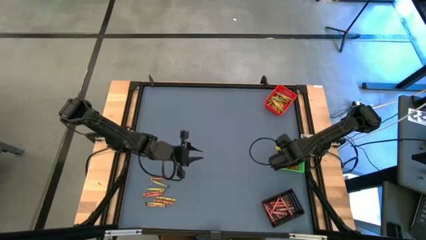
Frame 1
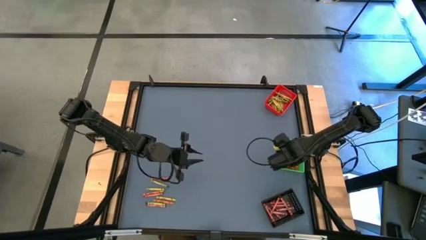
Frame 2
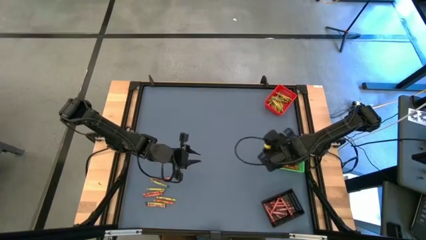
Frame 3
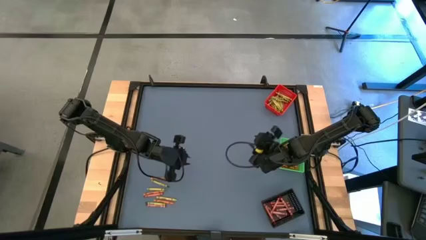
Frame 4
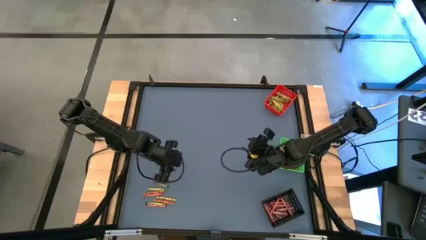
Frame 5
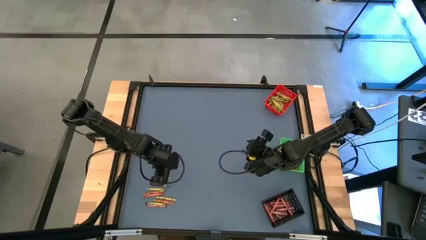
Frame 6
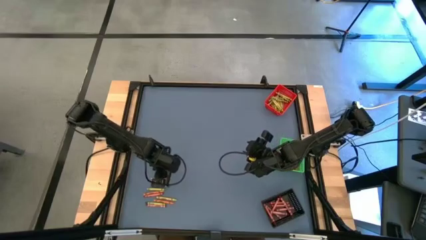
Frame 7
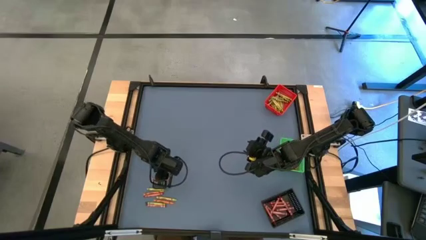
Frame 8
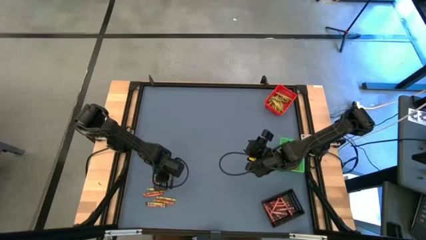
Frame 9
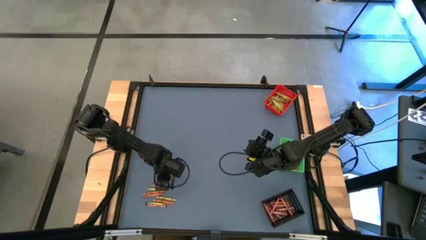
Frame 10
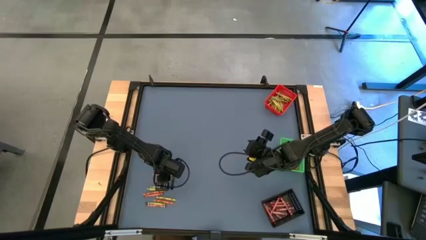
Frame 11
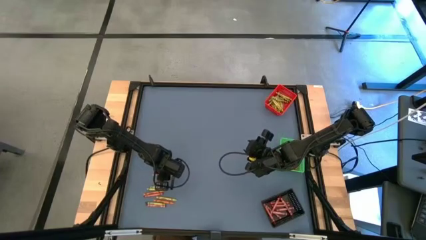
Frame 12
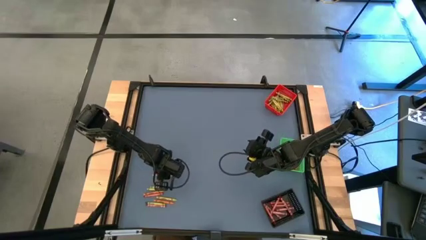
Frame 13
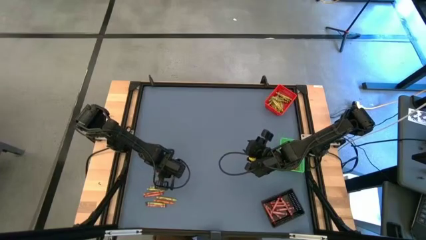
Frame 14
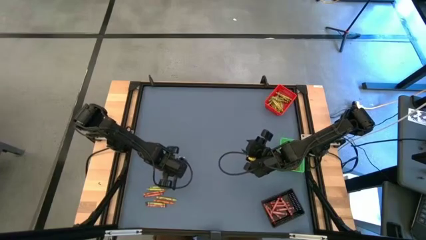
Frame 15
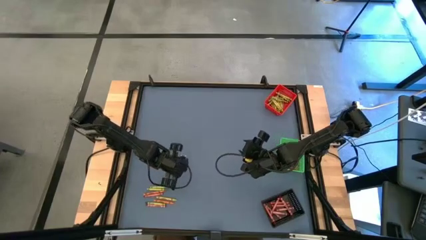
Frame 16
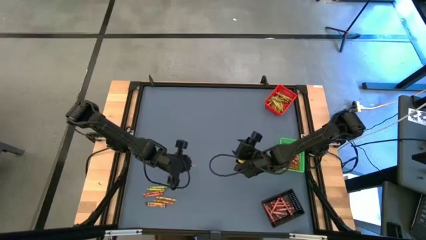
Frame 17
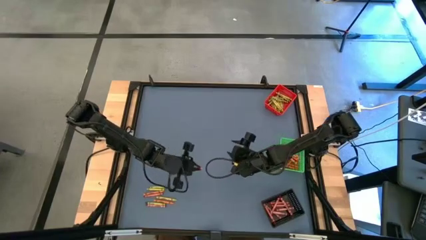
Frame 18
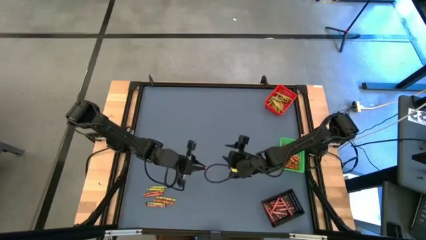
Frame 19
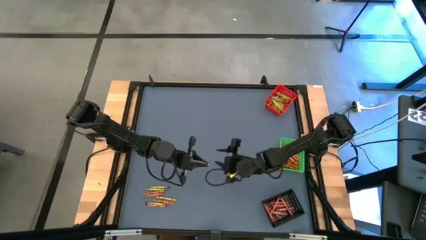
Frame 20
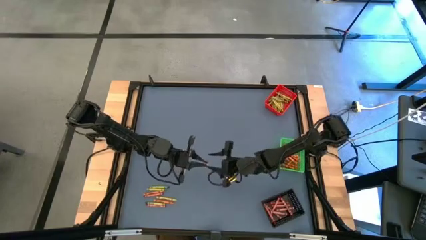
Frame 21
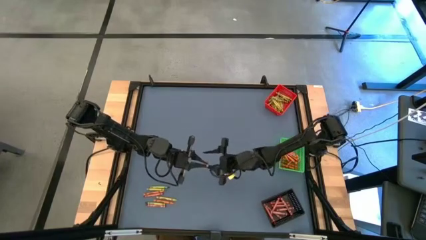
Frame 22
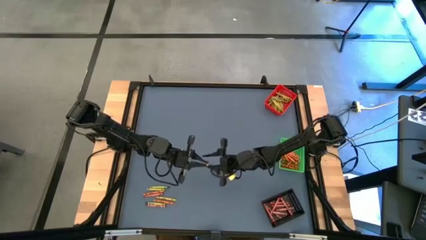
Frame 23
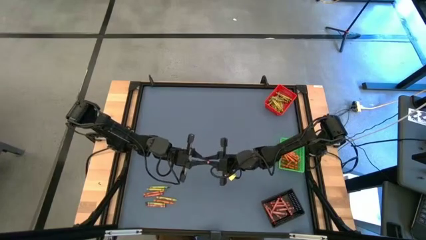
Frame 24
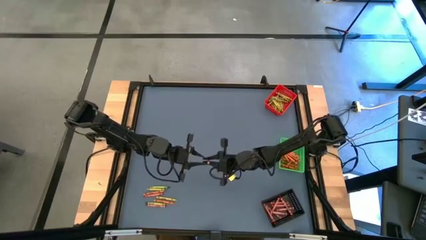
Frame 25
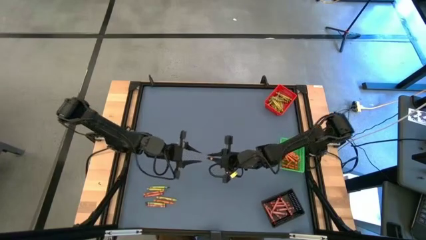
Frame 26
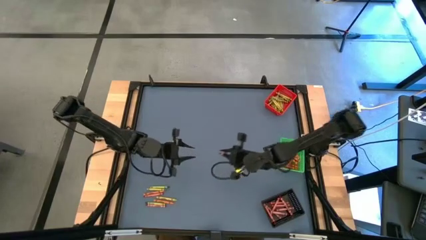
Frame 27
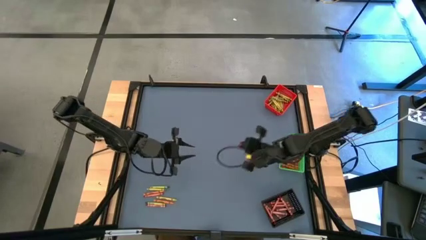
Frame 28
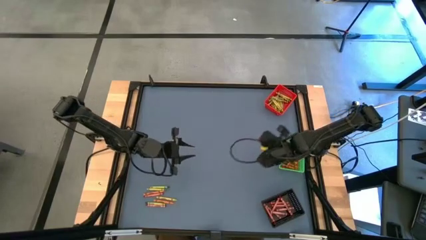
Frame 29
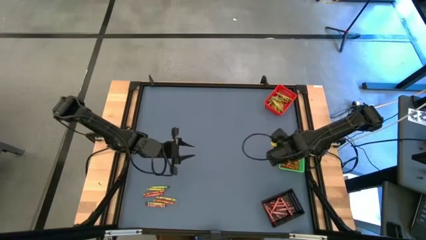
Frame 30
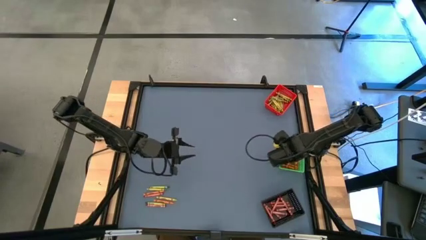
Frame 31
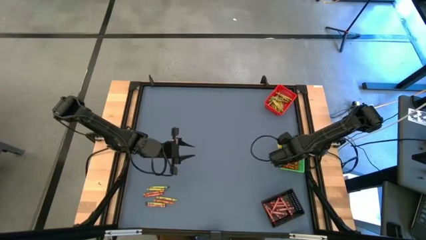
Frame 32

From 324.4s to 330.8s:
Task: Sort crayons
Put the orange crayon into the green bin

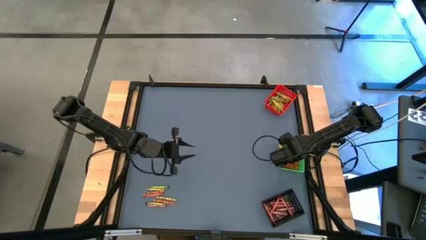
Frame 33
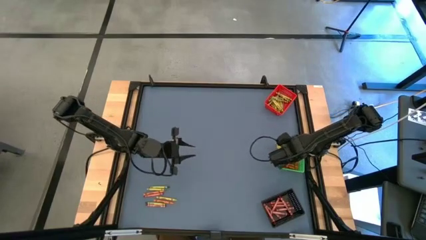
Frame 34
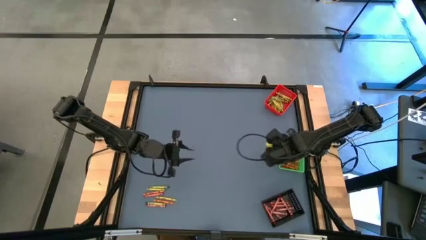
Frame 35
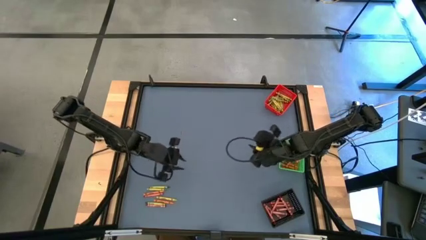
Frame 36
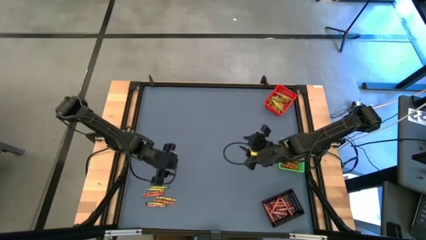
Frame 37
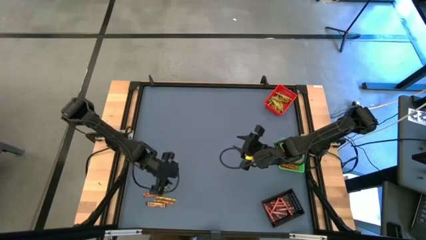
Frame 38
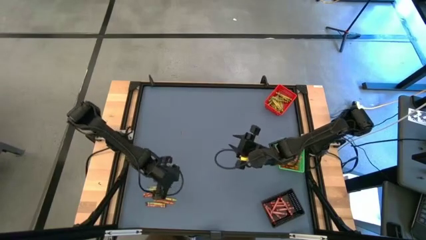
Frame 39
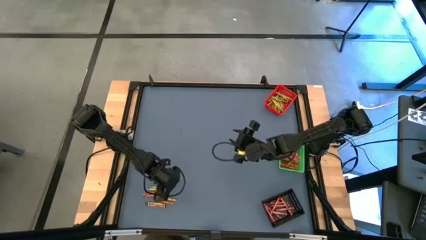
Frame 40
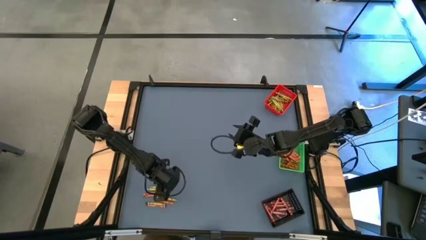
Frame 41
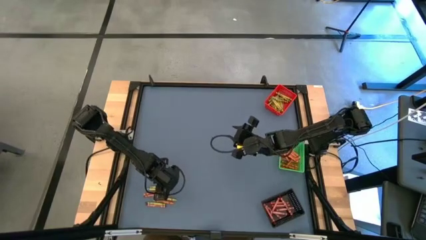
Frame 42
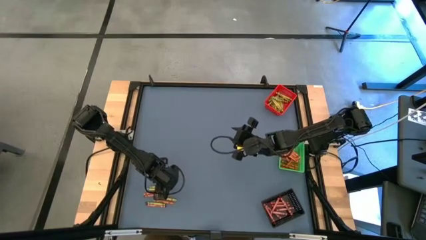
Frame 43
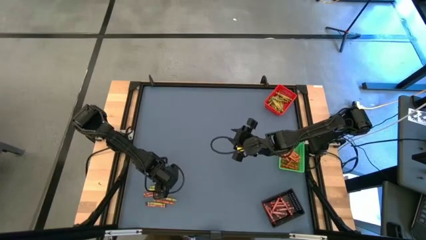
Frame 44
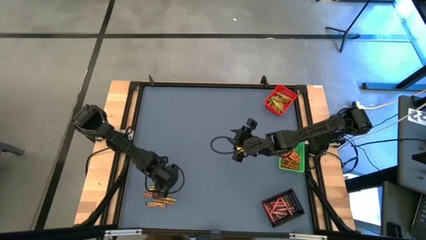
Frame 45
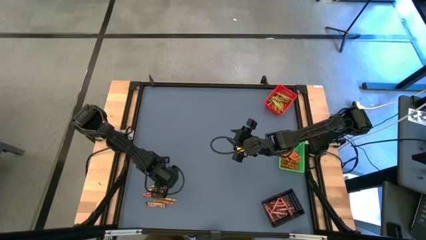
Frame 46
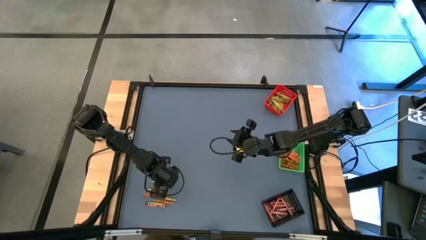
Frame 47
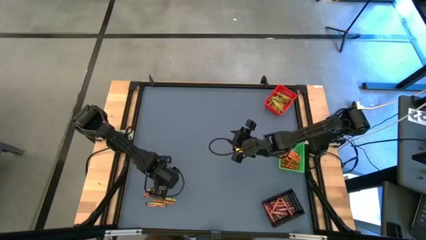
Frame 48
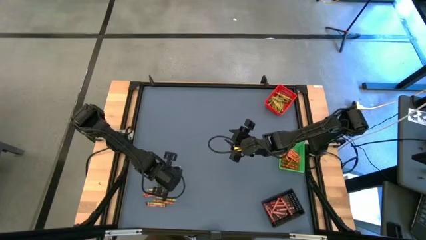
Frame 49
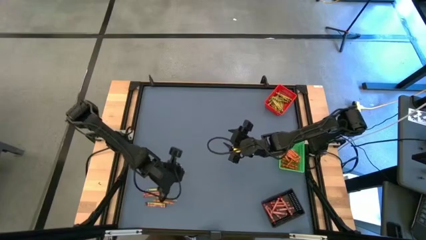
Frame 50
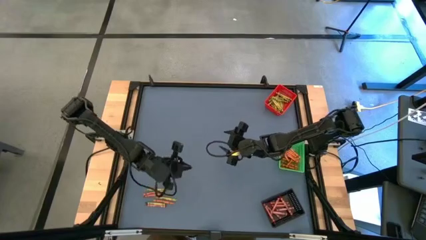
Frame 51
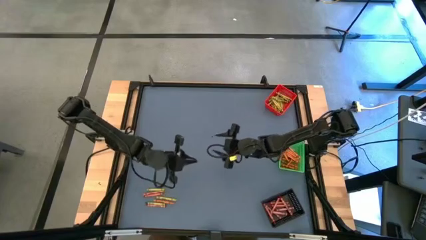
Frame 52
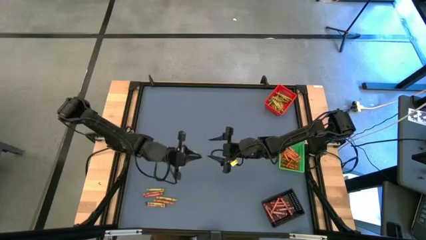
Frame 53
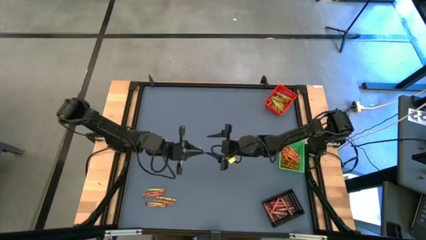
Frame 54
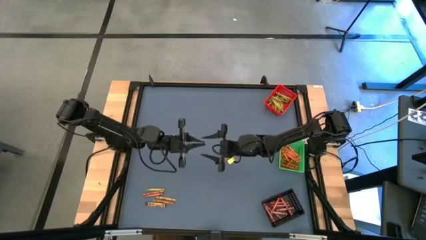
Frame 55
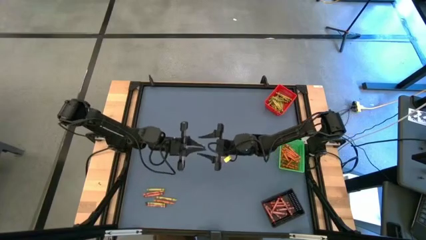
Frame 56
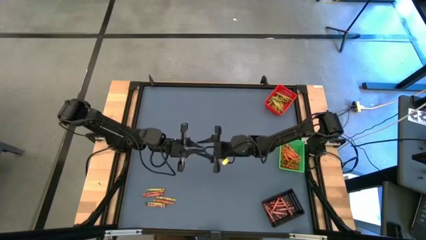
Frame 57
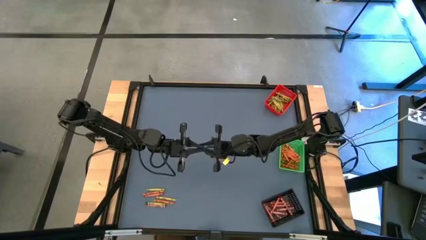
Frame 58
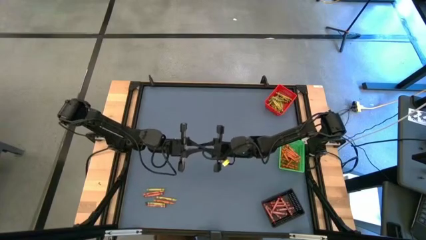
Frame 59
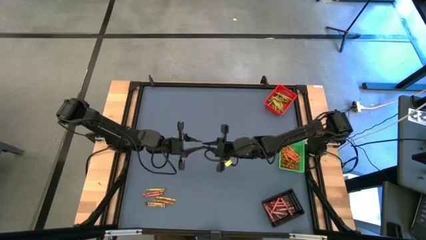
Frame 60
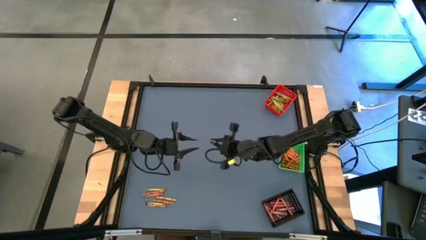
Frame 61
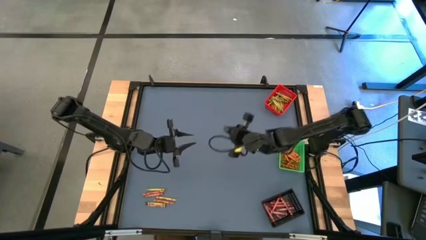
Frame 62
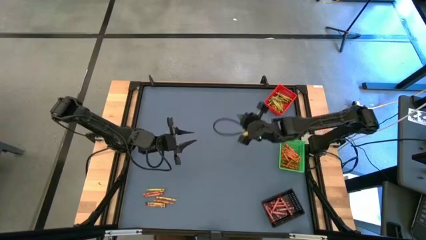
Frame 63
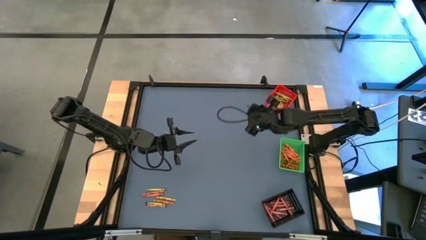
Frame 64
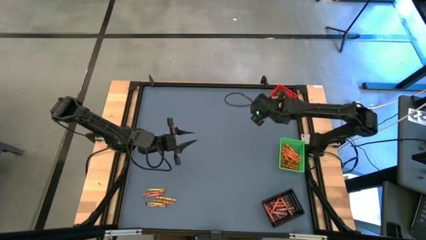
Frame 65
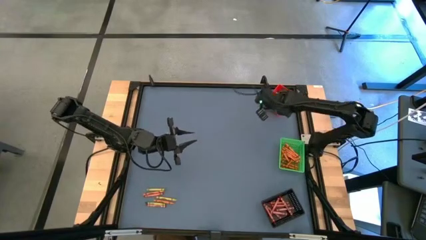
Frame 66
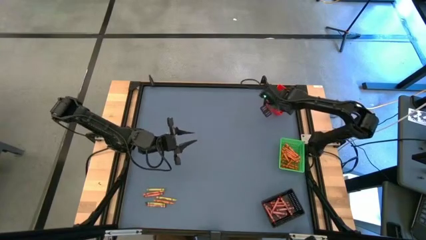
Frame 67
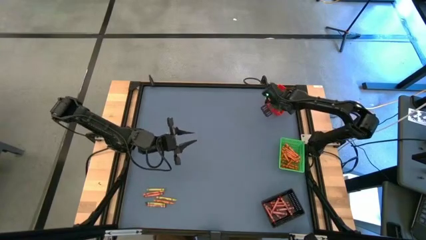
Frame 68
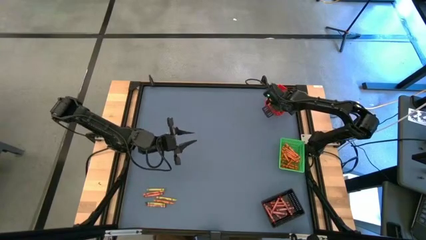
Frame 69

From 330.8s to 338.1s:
Put the green crayon into the red bin
